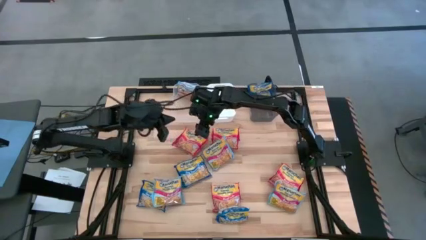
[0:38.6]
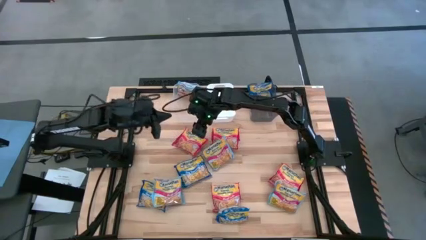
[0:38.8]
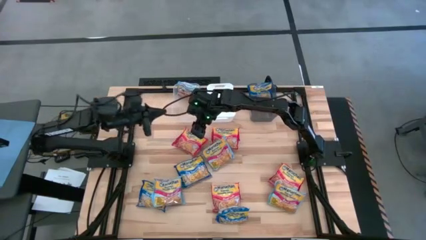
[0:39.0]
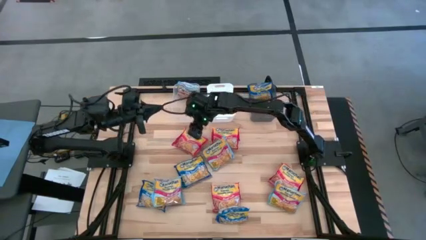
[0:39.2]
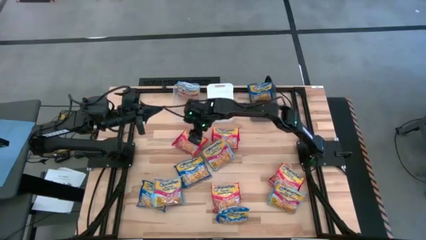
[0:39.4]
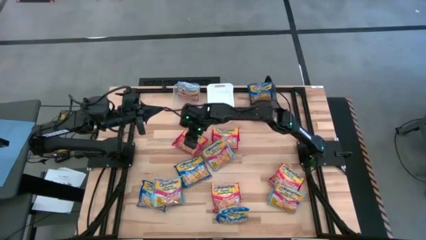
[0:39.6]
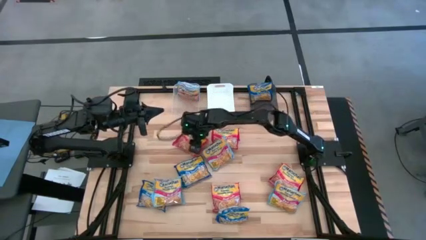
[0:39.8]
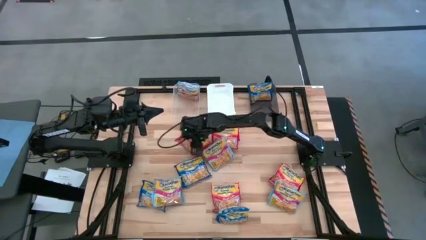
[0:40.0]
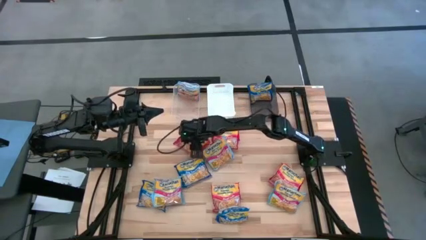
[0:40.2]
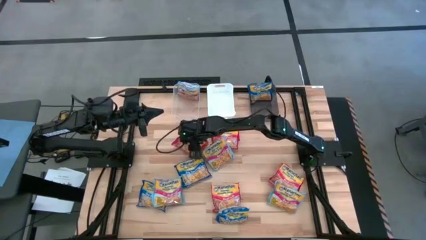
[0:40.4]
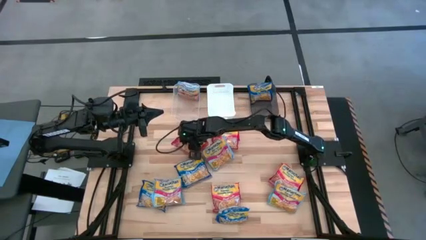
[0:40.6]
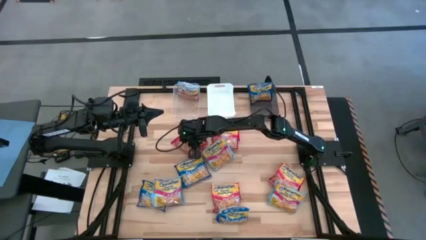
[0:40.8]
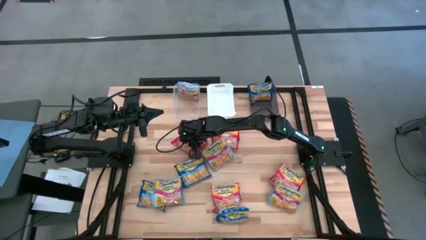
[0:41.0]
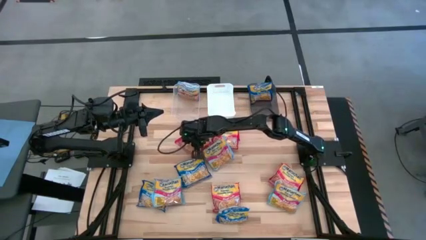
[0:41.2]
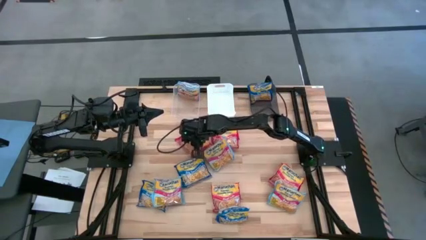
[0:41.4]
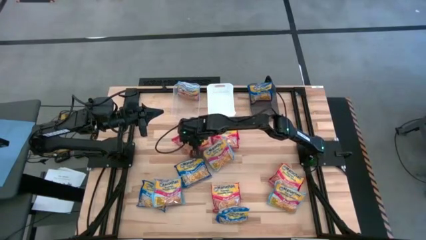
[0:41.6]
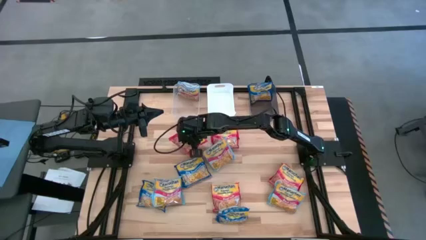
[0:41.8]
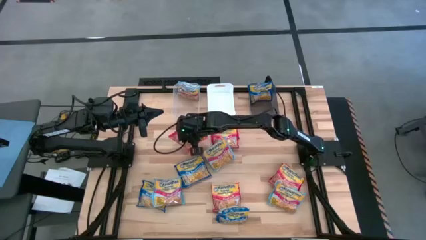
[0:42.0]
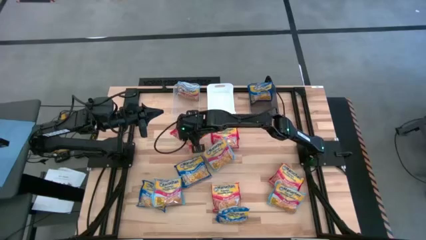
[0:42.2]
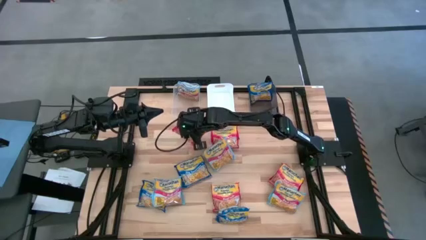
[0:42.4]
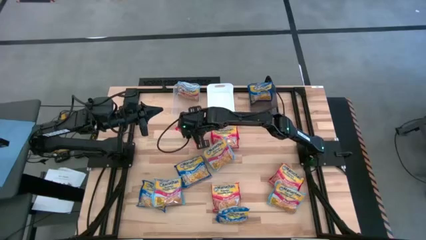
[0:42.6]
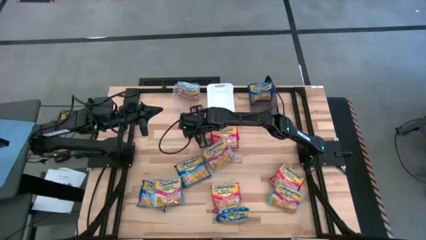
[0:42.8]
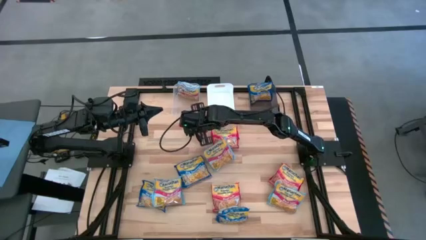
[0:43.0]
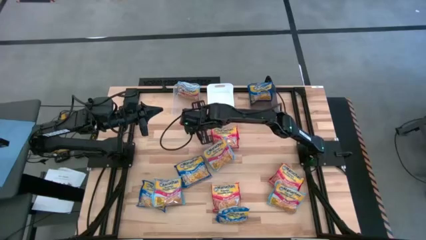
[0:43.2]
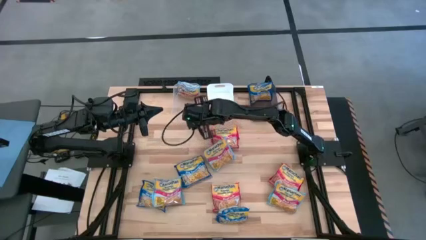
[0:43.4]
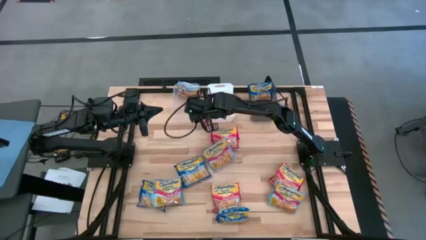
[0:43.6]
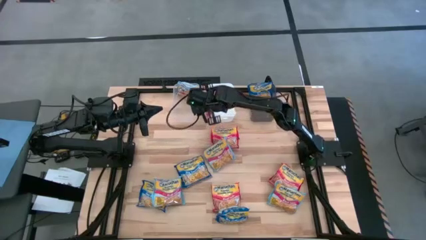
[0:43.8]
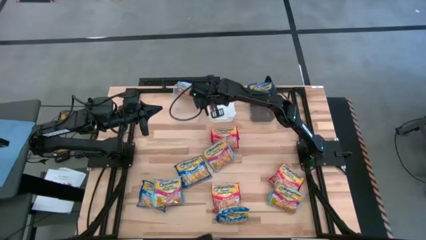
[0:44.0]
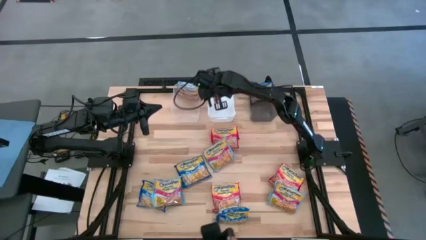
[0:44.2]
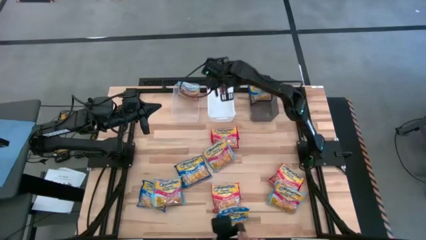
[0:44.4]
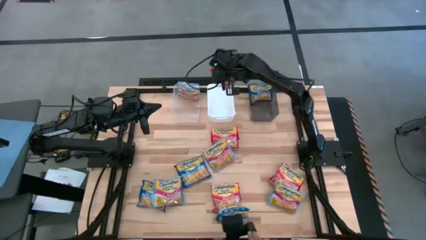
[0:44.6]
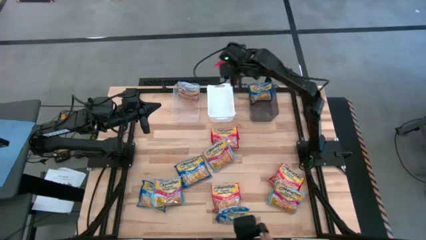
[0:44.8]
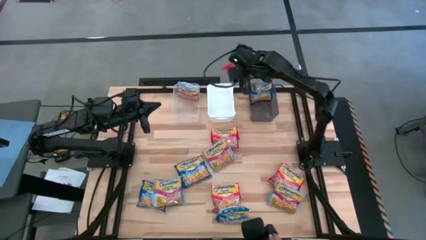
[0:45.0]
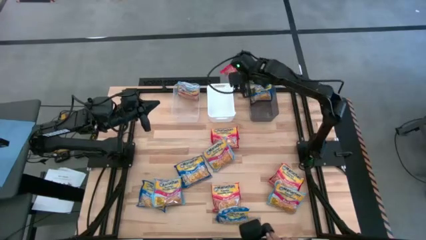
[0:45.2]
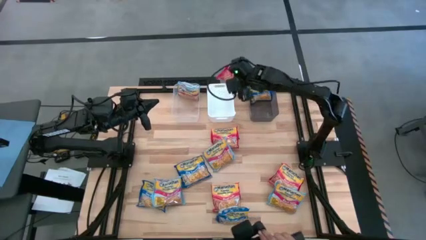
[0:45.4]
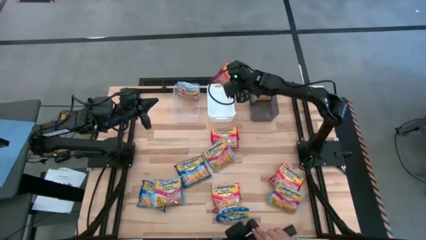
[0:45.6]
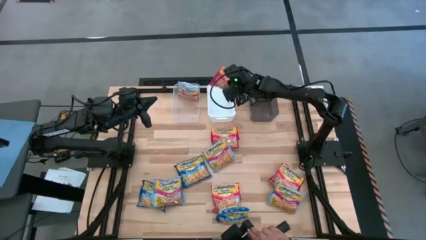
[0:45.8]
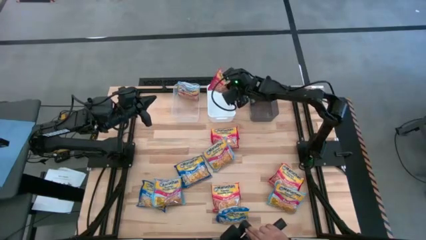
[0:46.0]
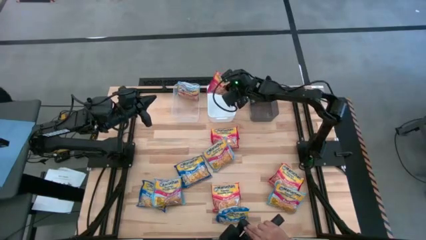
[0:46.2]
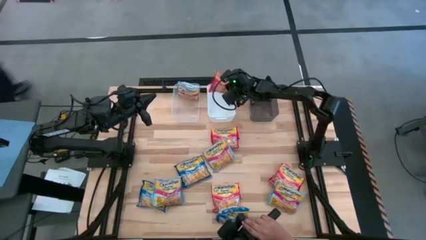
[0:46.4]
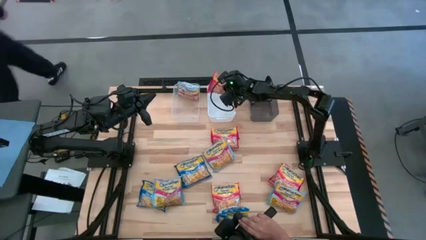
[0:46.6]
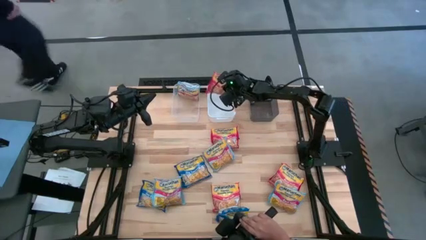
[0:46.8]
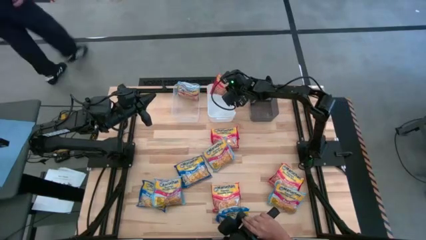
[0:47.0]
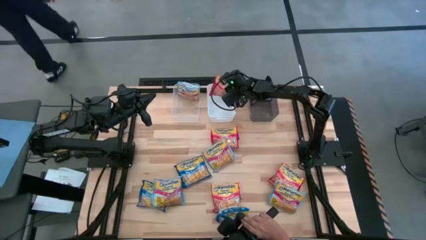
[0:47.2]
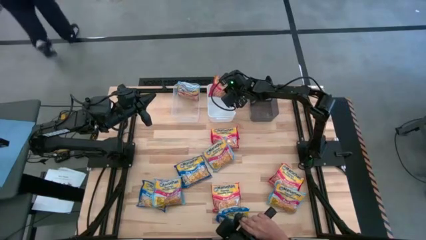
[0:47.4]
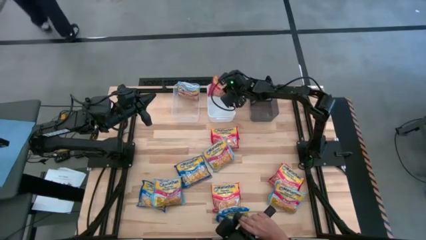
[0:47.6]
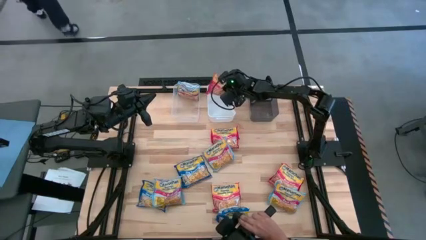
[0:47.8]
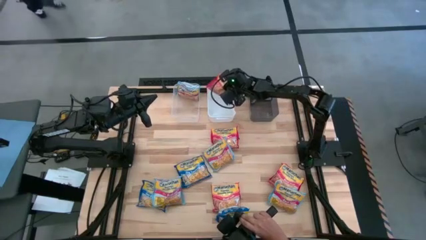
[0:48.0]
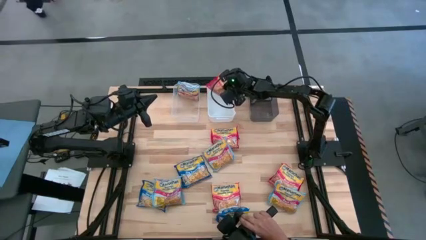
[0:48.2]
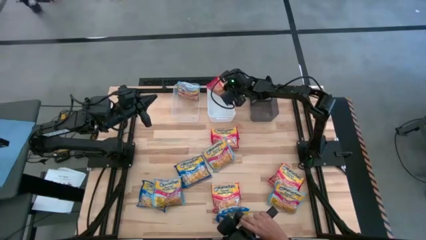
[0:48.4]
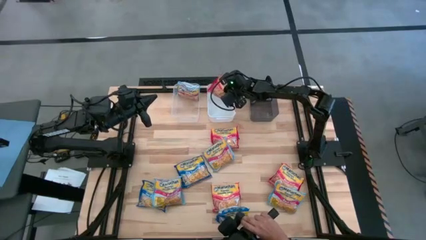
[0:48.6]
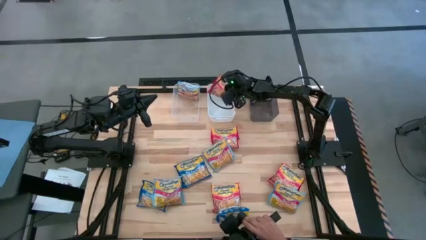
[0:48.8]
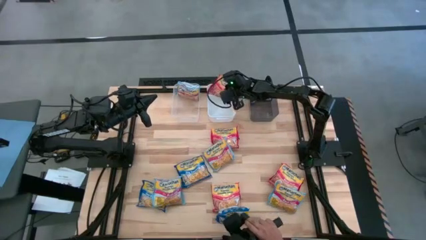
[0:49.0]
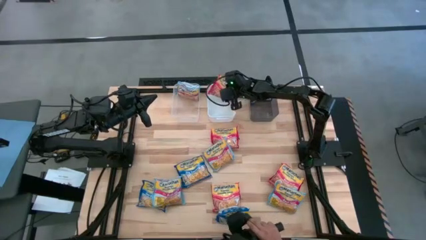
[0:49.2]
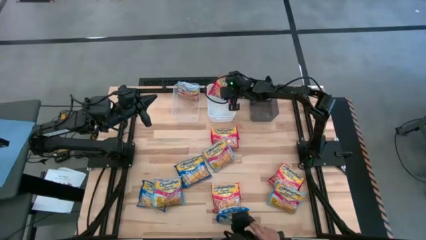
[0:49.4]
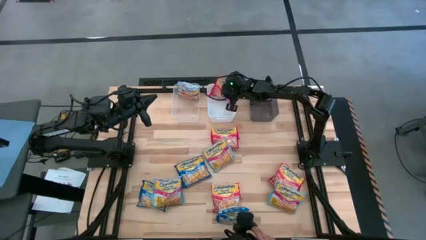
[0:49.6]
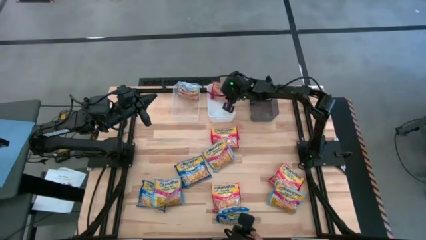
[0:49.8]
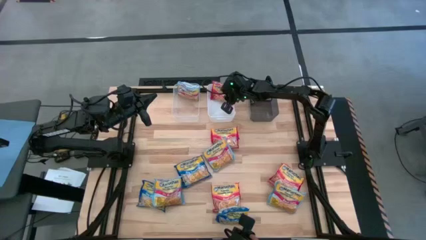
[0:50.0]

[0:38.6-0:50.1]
Task: Sort Maruchan noodles
Put the orange bag into the white bin
